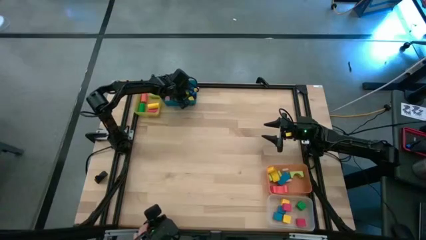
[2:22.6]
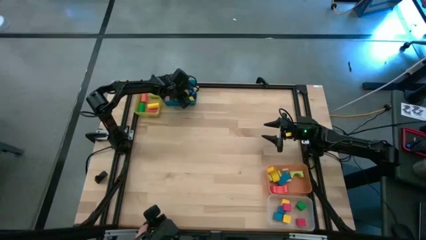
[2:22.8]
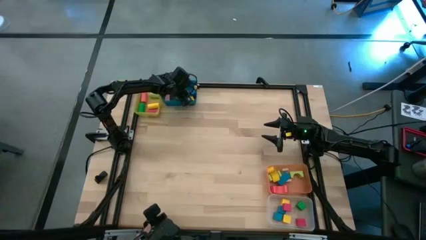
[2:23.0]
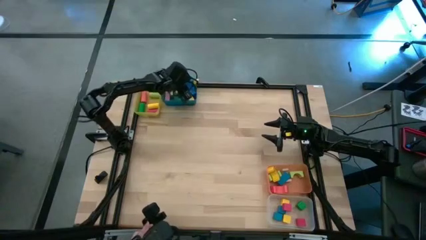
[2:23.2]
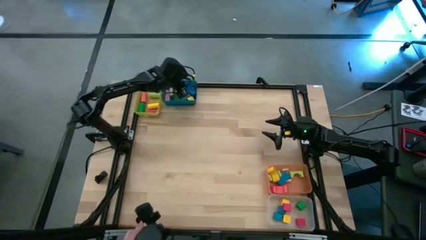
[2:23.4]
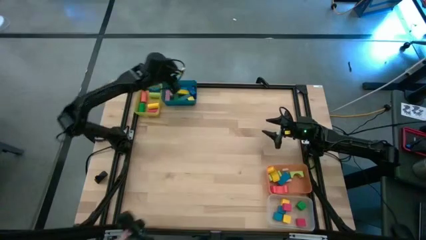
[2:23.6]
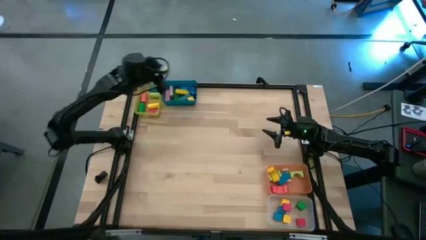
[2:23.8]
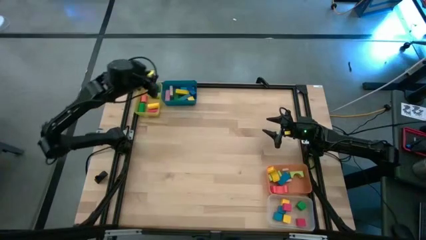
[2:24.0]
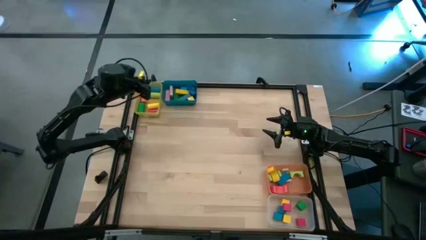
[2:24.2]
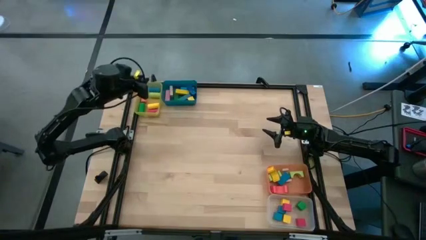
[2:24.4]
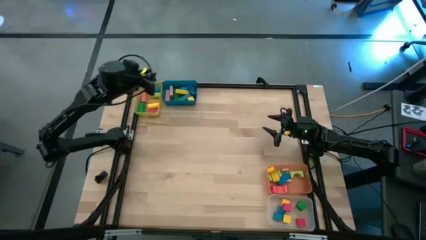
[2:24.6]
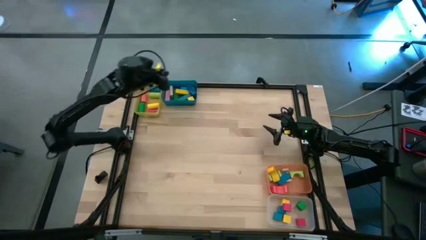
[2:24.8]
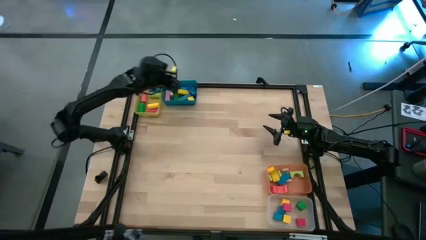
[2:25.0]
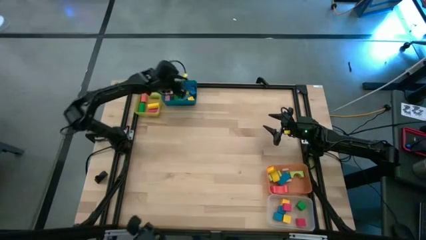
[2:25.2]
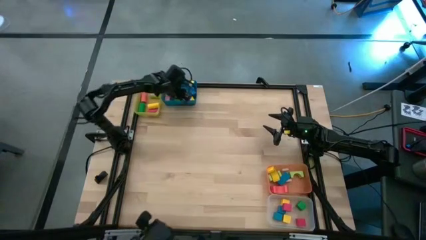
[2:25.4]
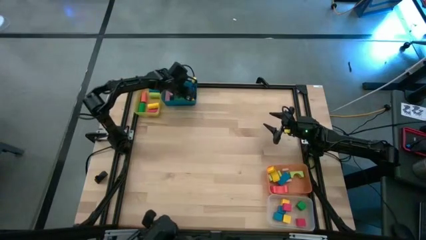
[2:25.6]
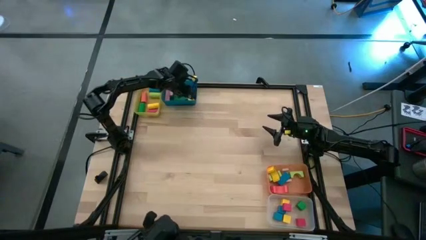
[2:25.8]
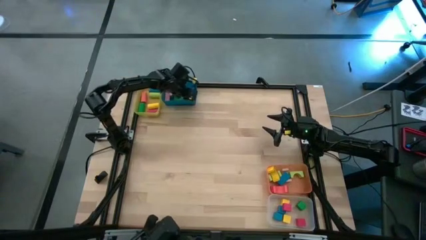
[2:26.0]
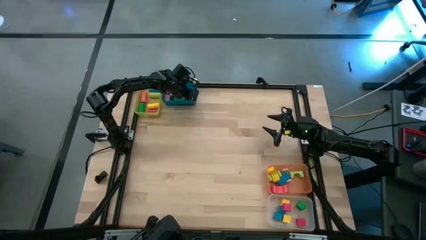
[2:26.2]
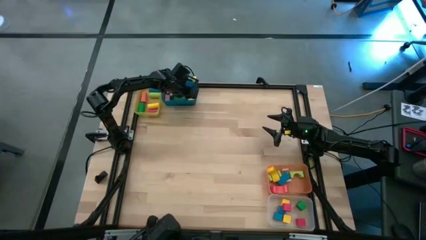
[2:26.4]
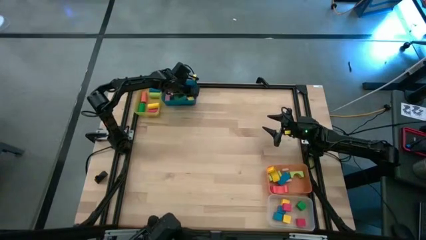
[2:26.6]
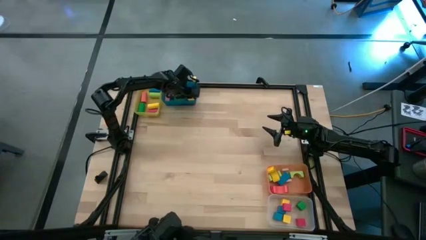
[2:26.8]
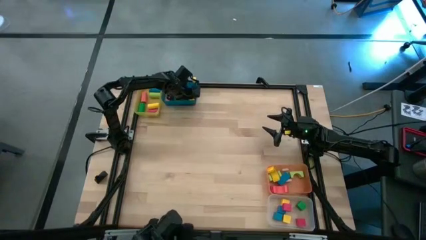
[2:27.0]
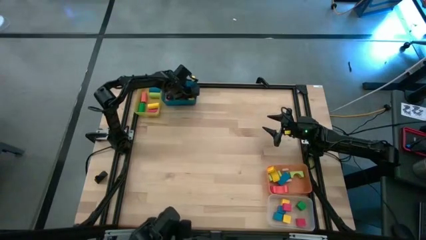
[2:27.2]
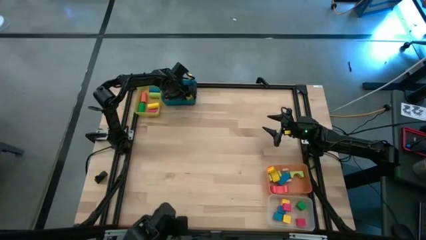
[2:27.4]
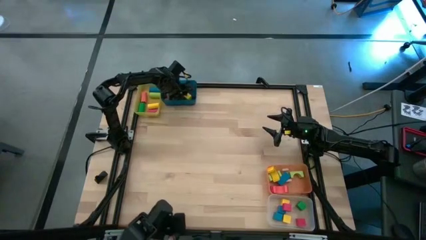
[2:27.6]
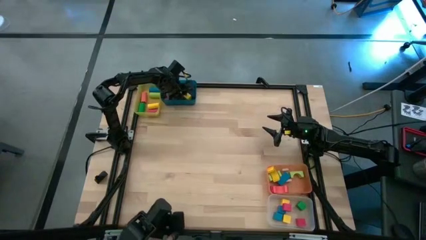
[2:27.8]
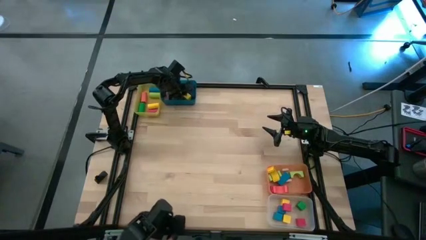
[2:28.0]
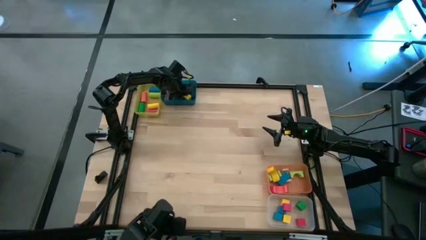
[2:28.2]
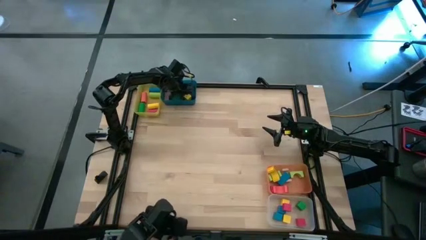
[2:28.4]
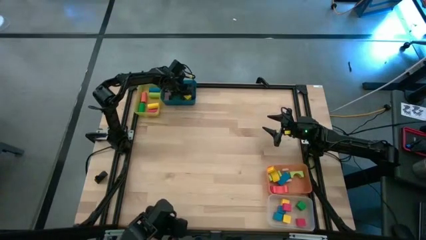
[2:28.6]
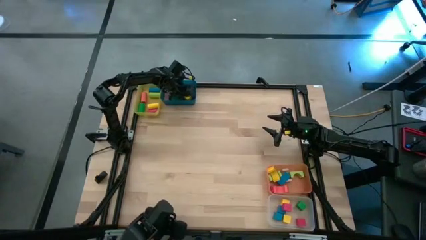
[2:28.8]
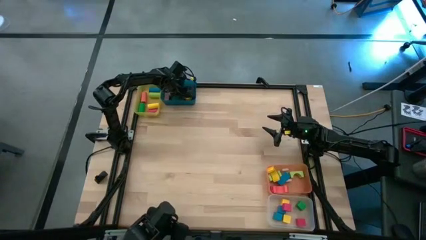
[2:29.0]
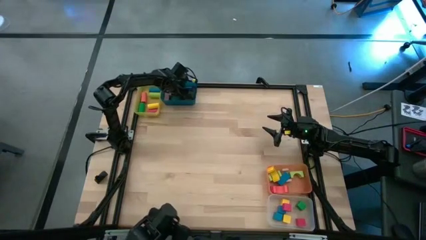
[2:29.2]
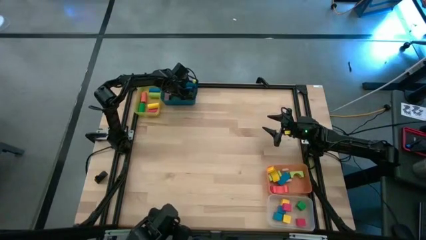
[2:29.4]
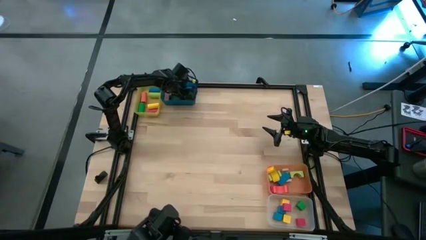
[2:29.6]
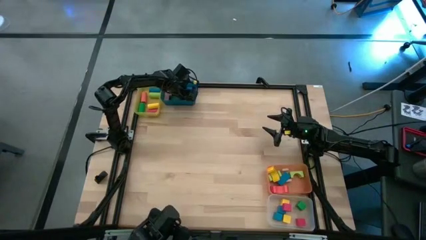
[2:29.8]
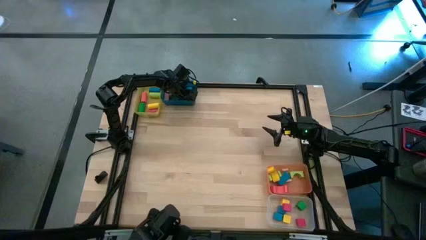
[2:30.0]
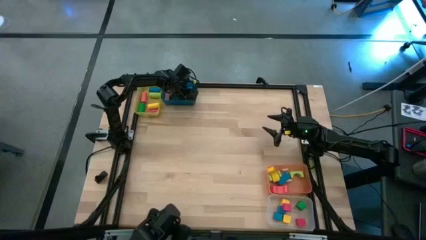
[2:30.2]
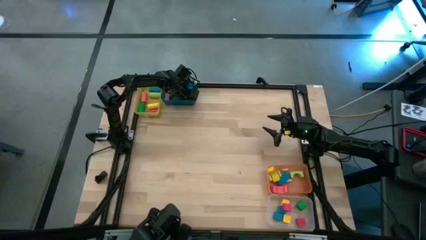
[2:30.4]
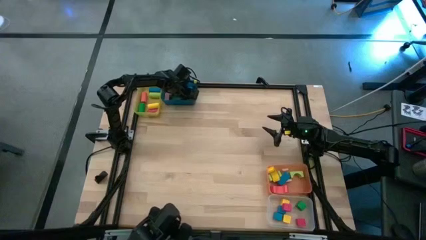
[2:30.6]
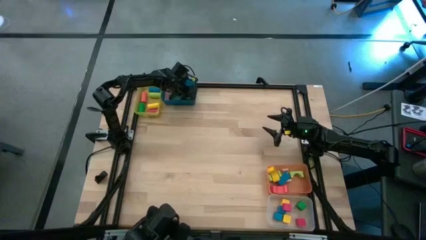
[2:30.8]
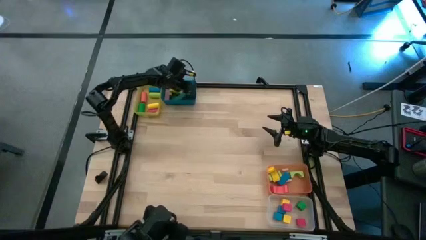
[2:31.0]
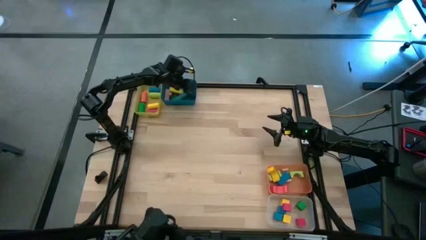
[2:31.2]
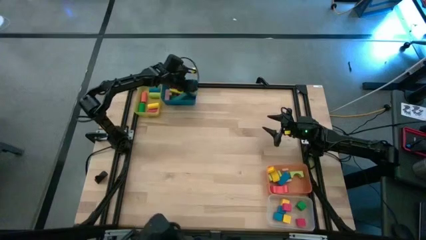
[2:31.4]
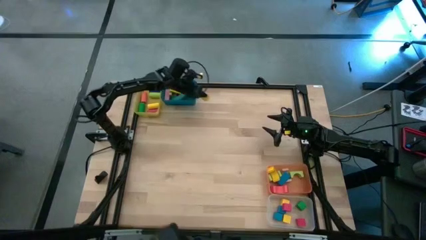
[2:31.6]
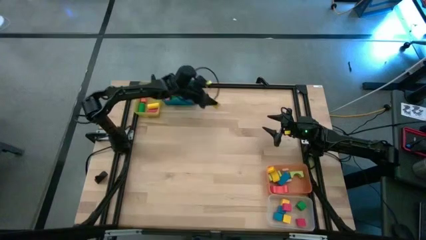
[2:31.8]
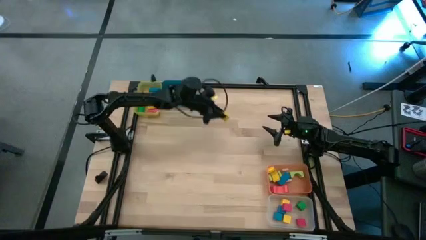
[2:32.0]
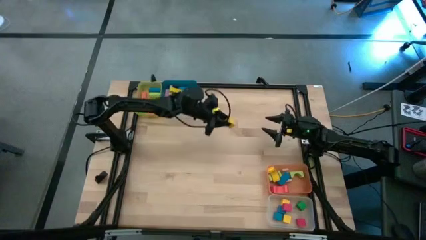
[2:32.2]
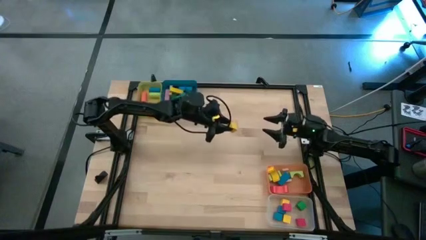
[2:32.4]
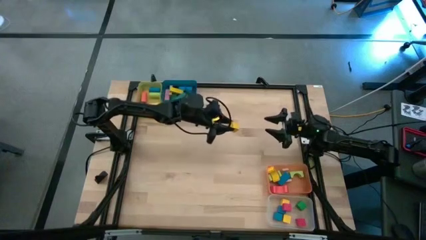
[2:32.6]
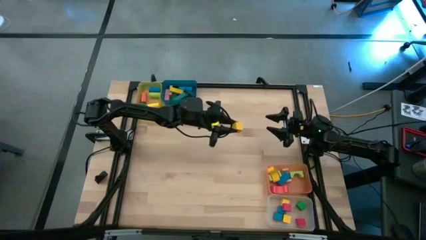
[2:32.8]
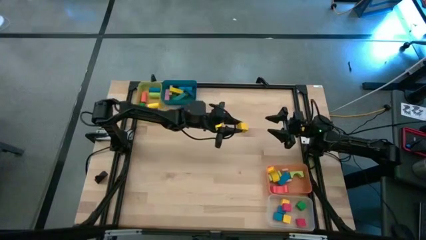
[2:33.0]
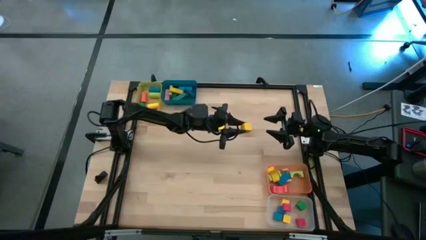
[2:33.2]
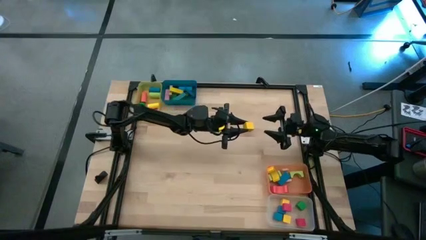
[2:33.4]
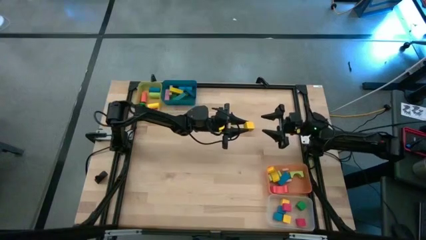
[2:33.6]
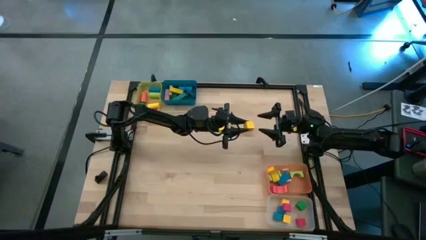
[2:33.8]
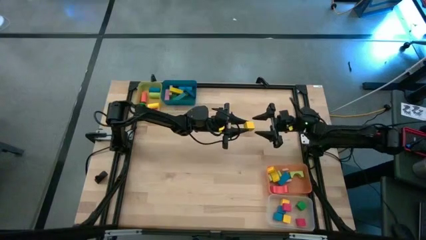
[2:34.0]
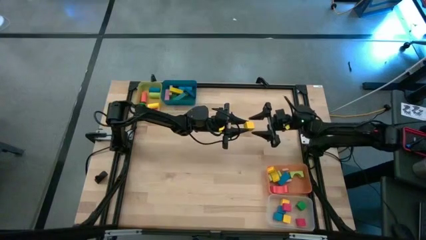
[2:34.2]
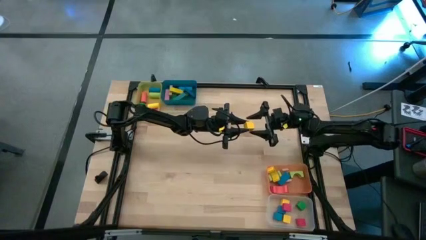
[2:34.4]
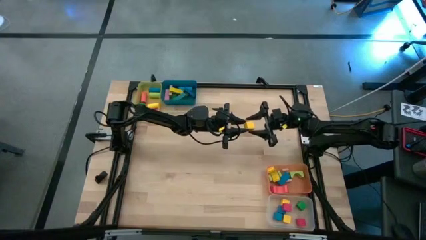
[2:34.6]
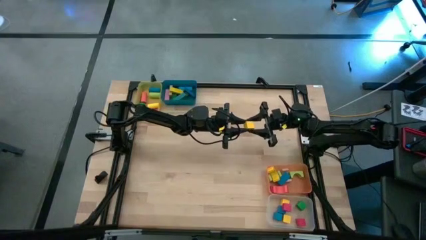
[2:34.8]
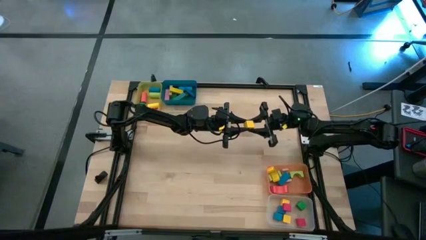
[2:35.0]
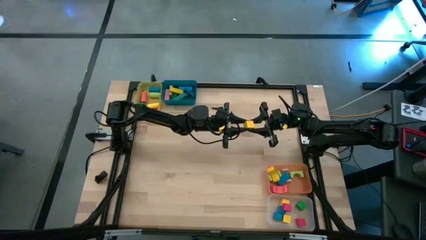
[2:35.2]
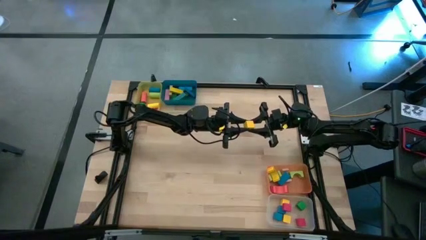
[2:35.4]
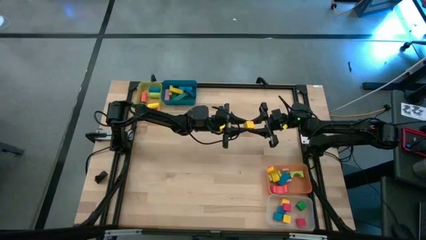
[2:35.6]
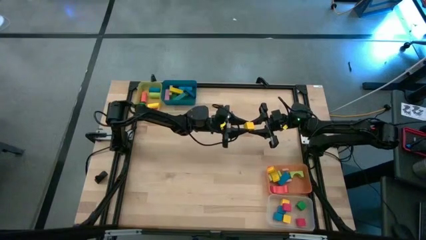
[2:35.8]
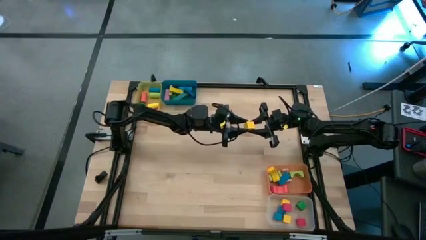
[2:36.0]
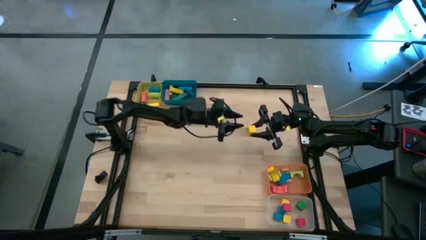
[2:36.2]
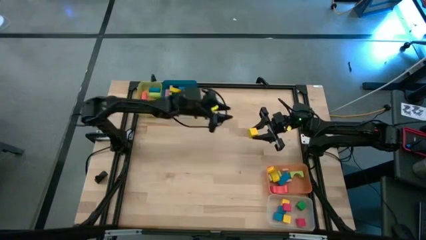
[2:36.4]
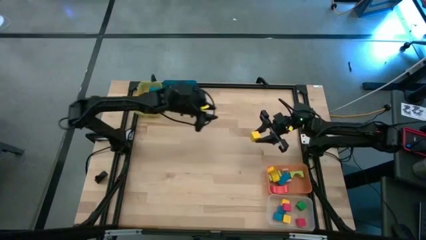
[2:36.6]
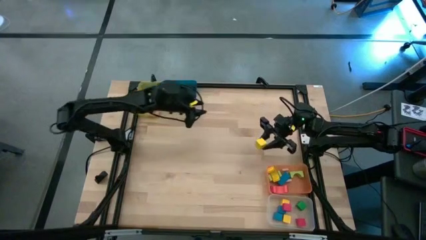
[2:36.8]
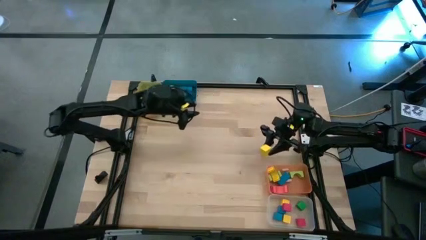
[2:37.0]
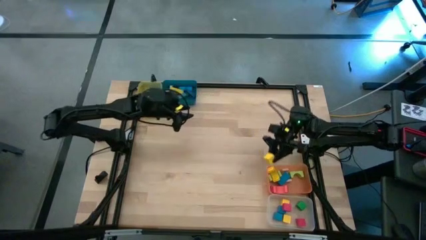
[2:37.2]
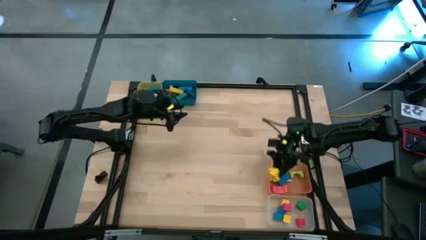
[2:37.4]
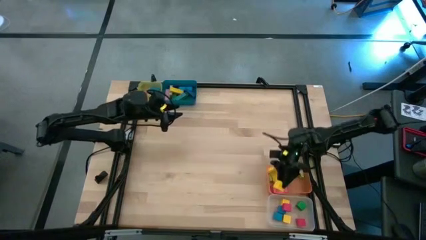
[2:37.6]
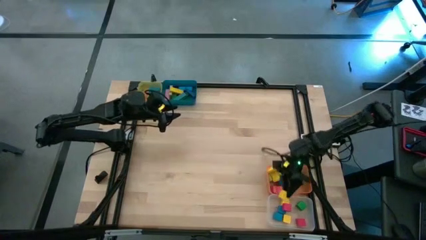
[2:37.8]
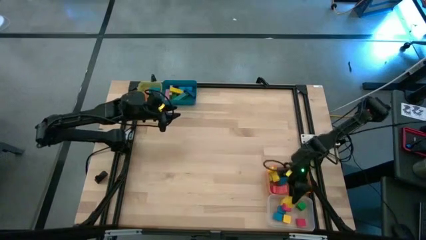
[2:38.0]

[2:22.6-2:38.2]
Task: Sort blocks by size
Put the yellow square block into the transparent bin

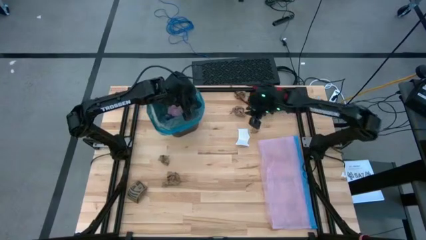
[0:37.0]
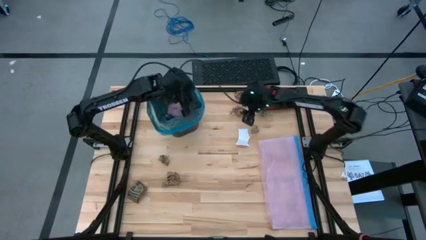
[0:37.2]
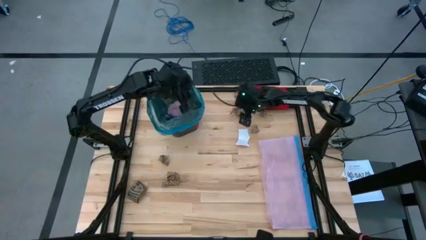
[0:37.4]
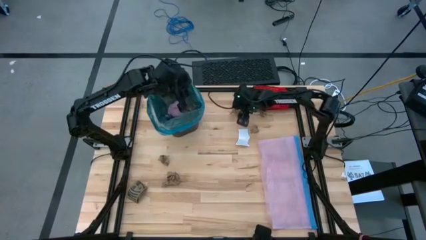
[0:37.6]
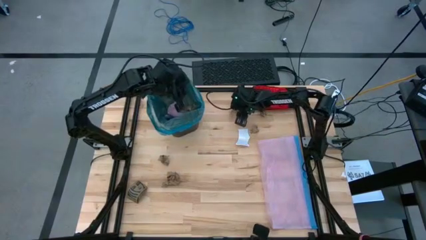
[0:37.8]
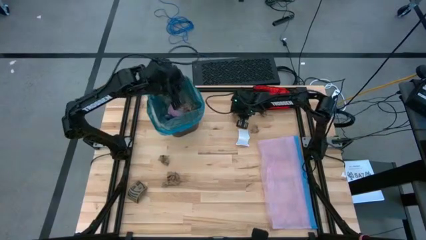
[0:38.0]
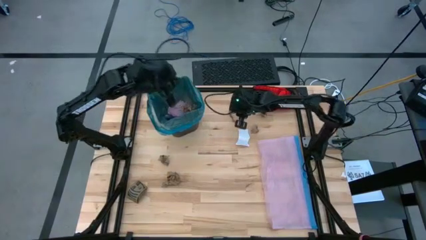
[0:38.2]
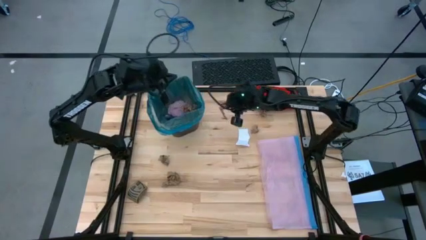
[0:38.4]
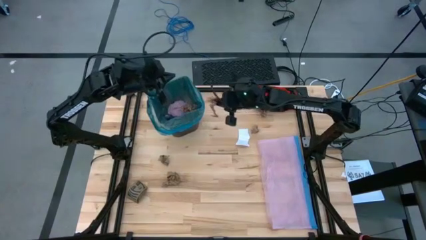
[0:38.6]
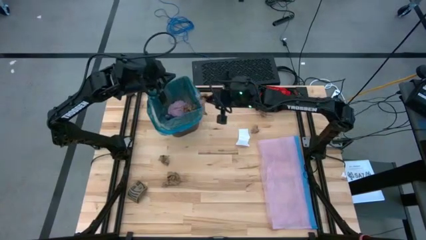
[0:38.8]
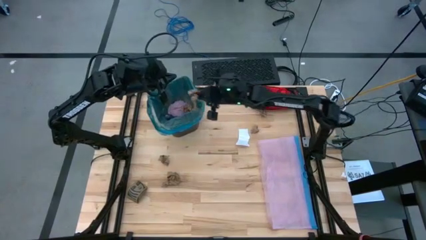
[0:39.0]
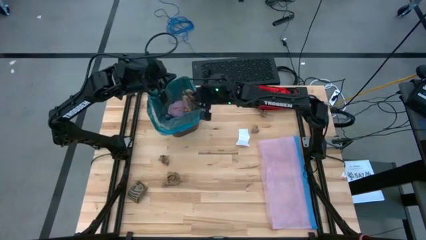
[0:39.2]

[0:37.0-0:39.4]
Task: place trash/remove bag and relplace
Put the brown napkin into the black trash bin
